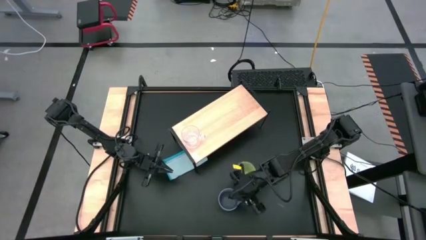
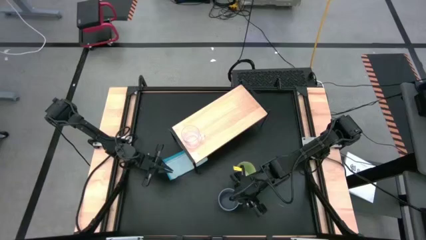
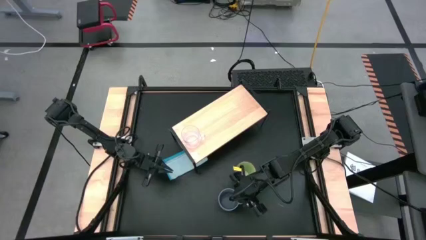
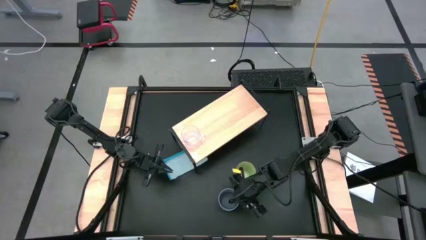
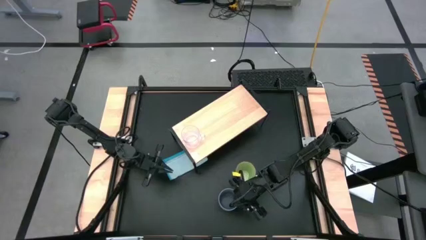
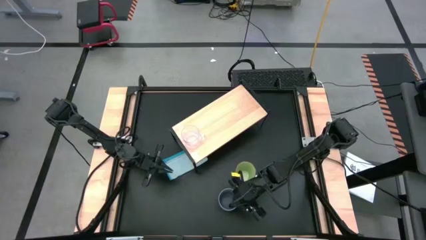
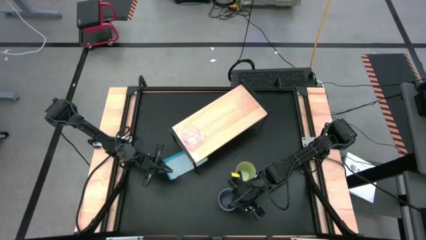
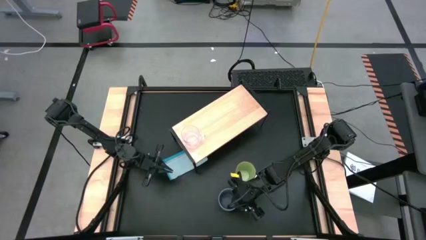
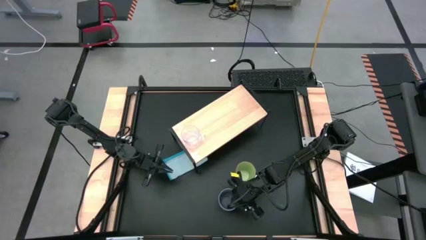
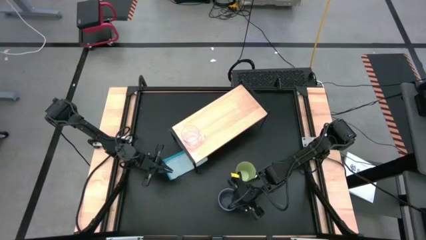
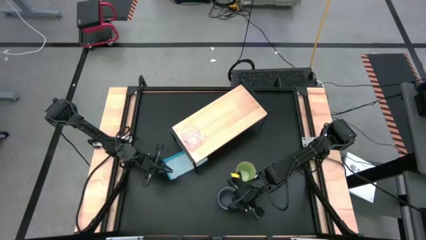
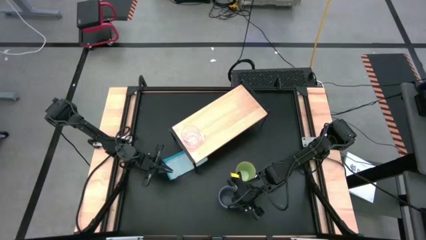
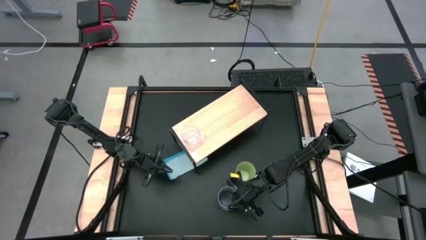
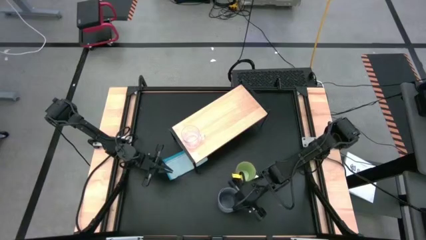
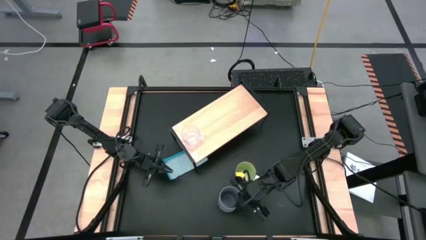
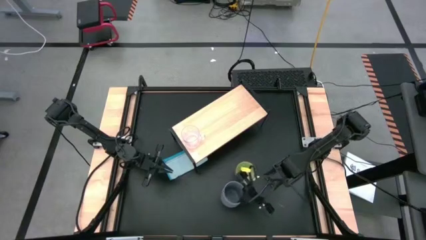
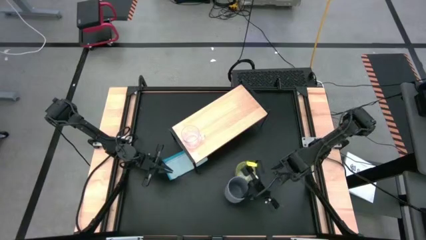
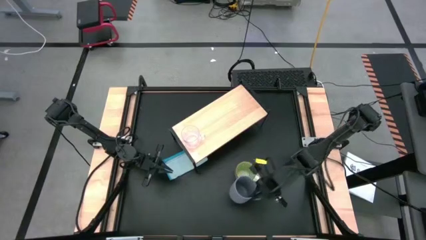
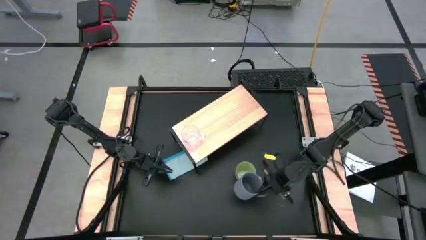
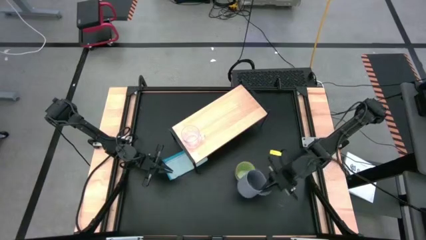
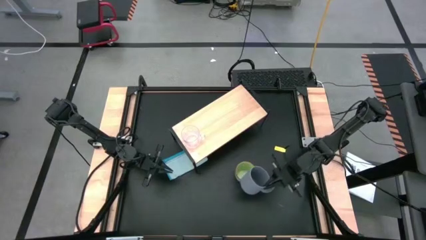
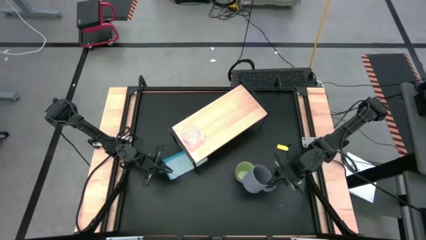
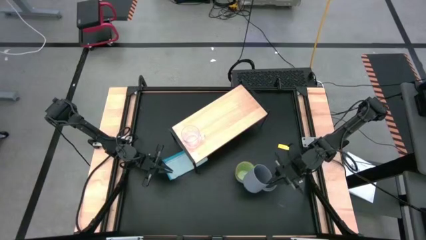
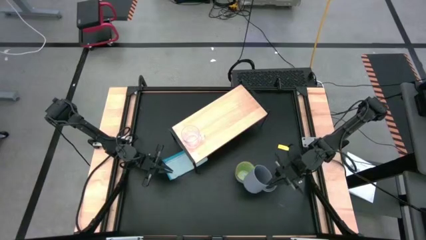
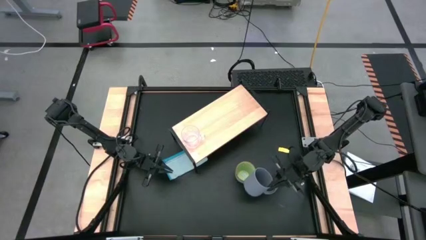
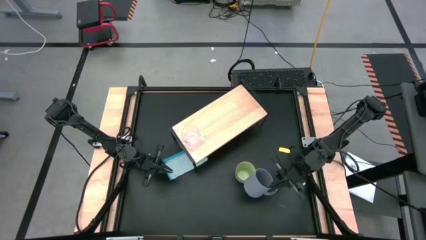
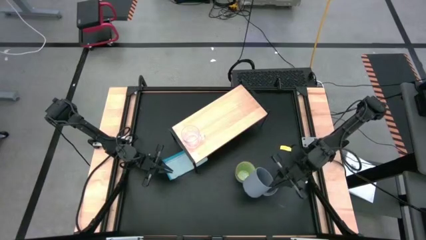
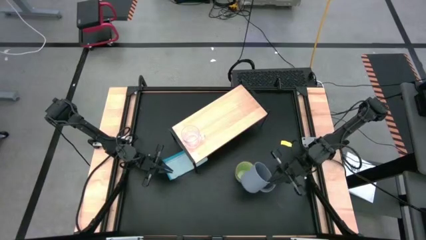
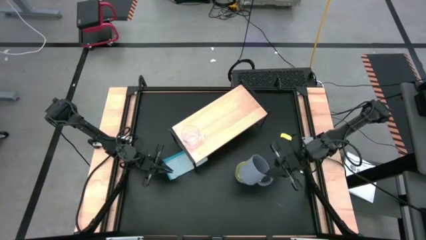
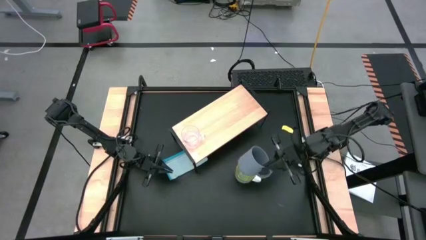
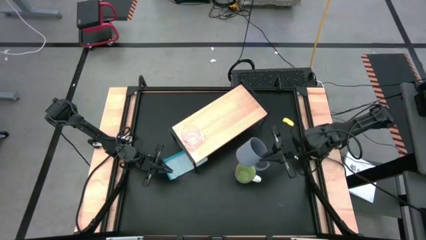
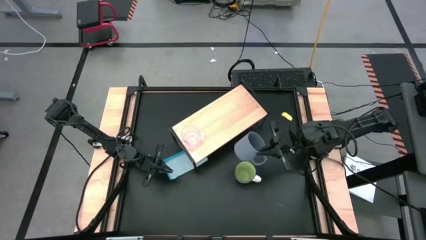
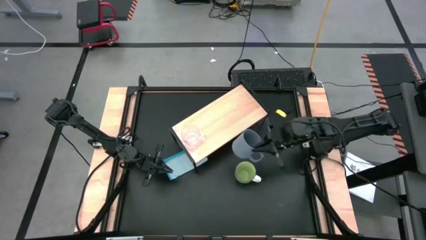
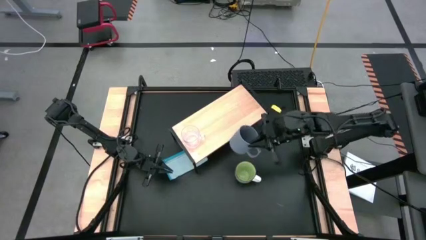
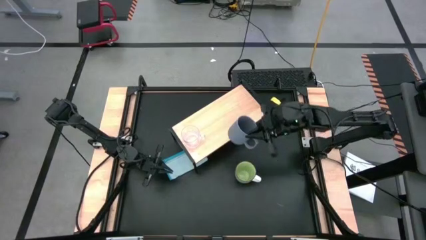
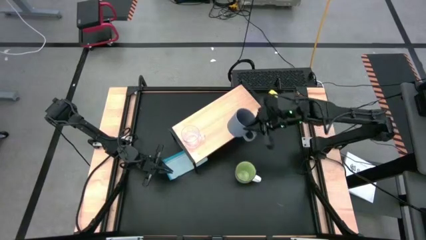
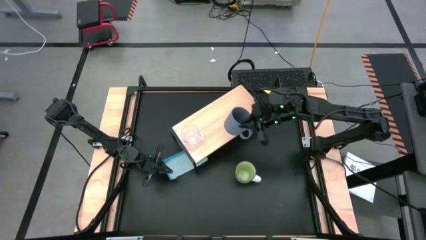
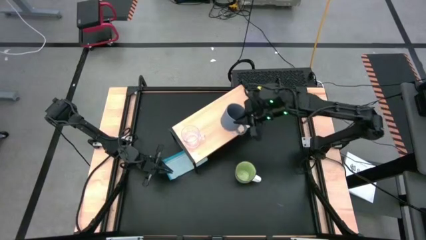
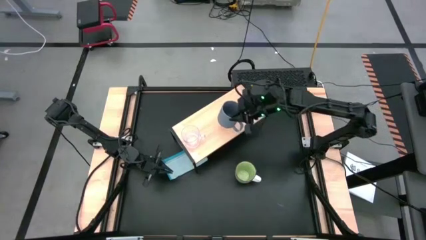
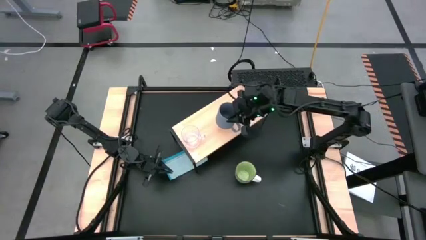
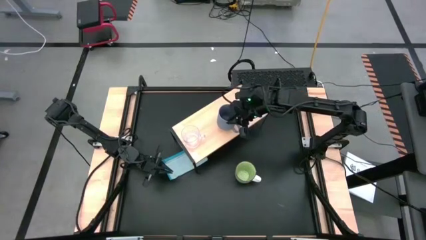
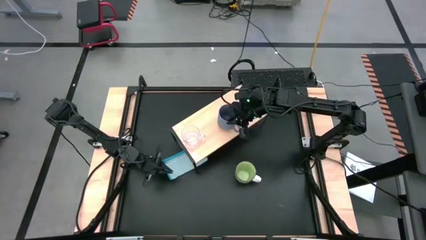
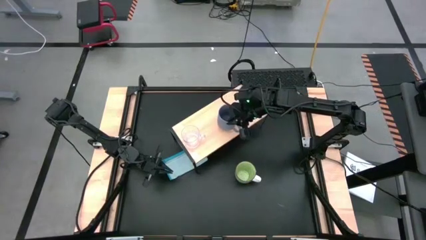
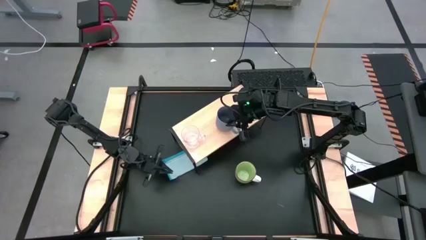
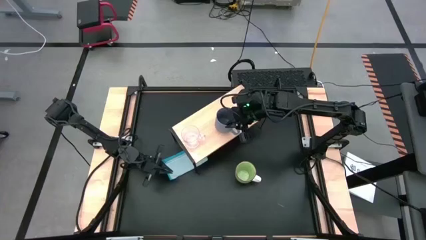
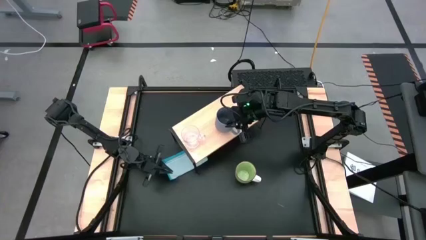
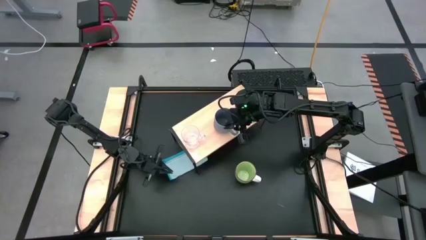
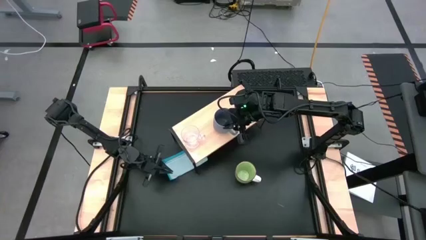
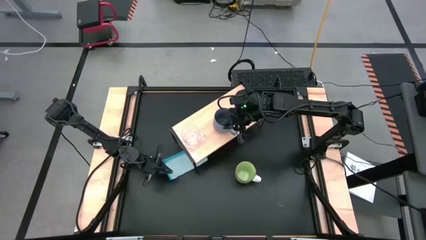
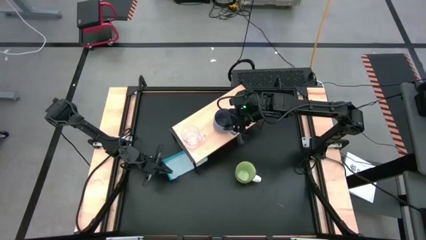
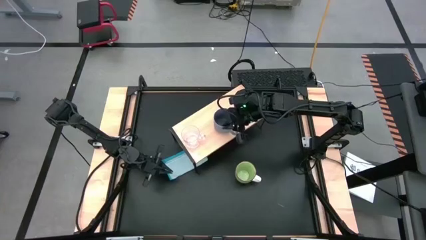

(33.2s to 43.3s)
Task: Stack small to large cups/mugs on shelf
Put the gray mug on the shelf
